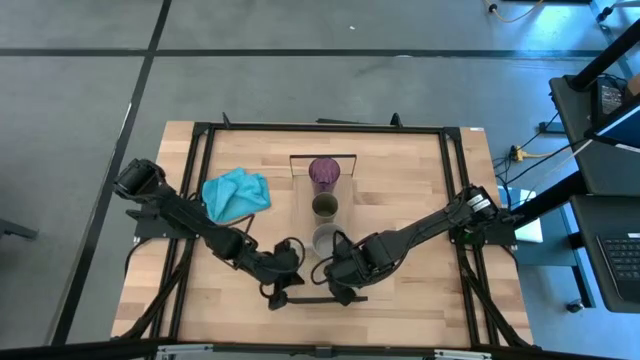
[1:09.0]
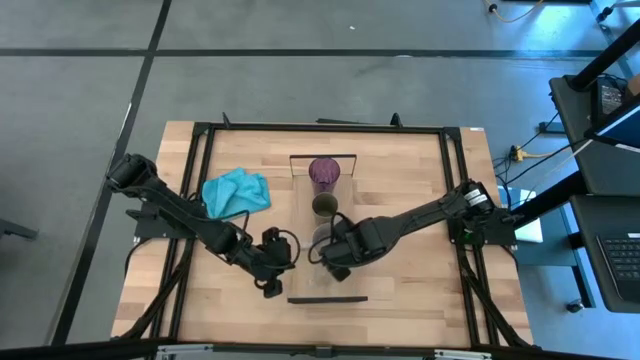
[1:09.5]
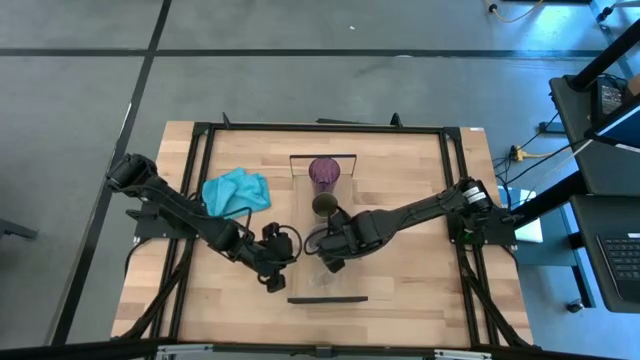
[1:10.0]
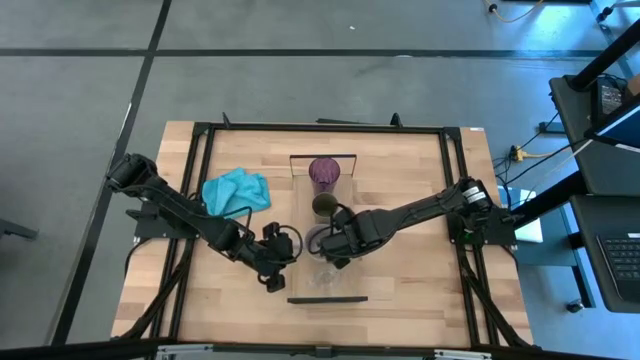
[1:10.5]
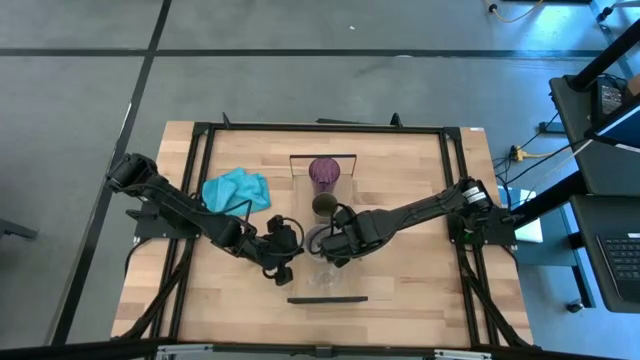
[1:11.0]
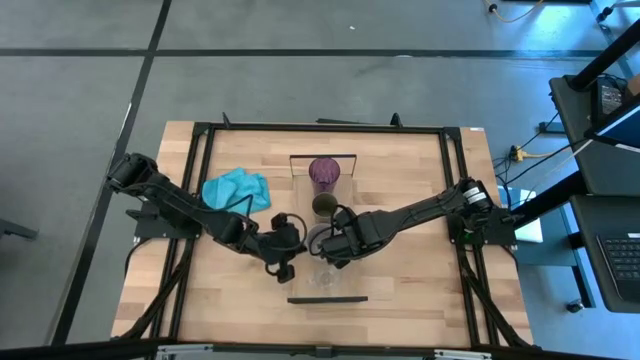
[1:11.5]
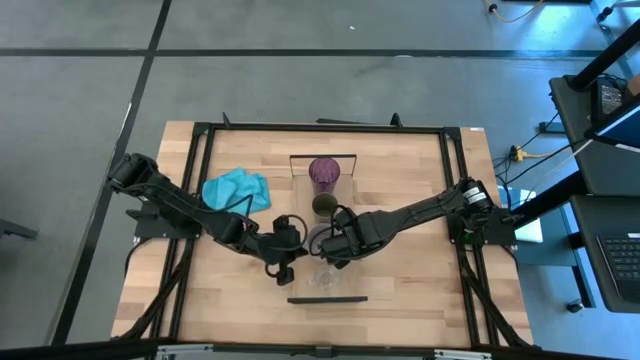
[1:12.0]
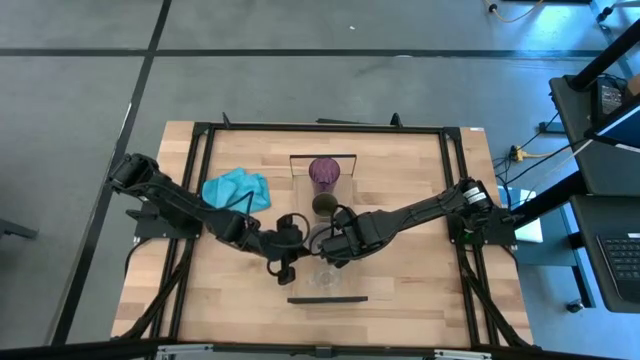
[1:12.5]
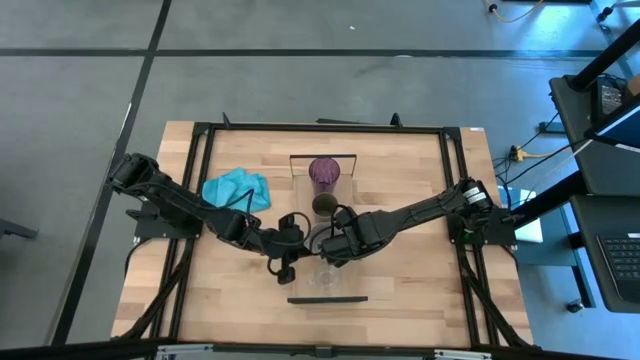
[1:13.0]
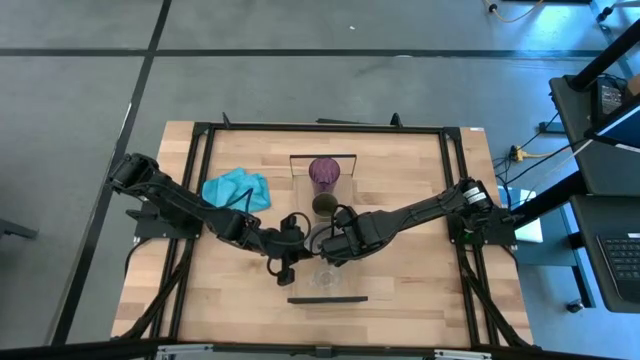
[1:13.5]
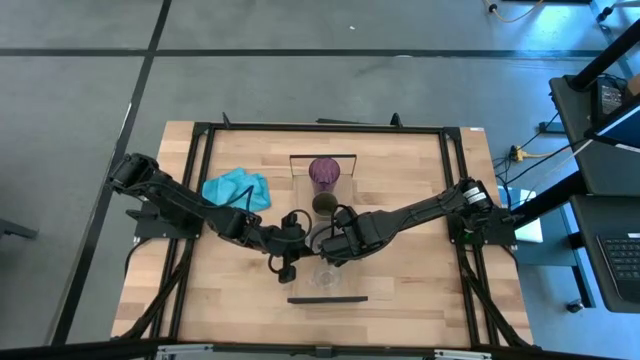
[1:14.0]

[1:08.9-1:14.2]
Task: Stack small to large cups/mugs on shelf
Adjust the light gray mug on the shelf

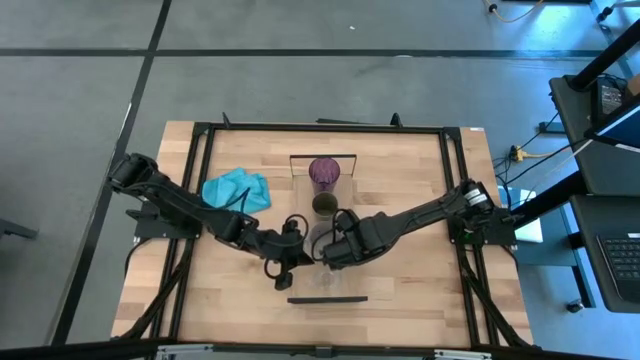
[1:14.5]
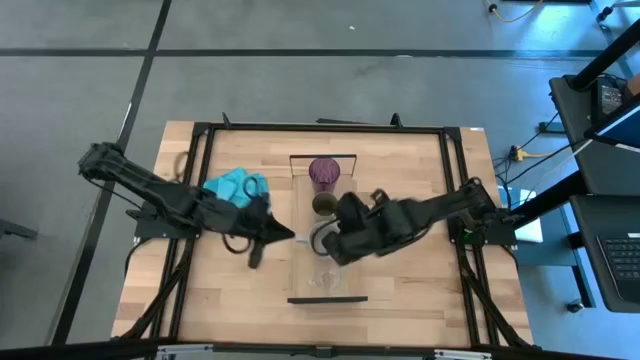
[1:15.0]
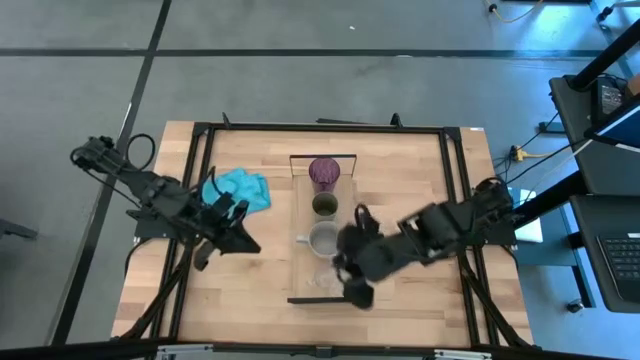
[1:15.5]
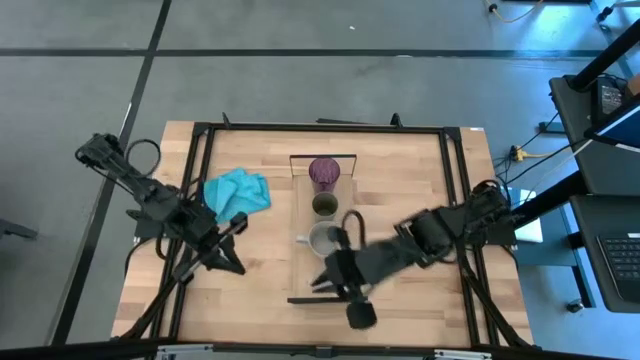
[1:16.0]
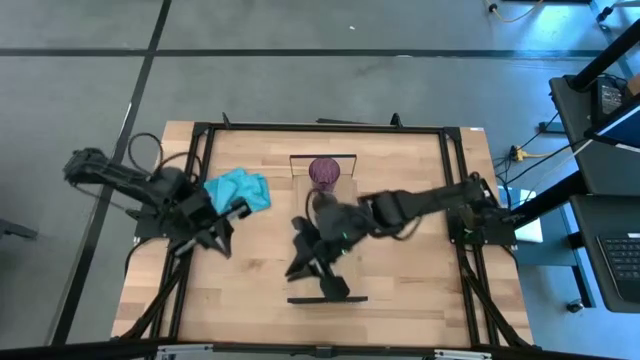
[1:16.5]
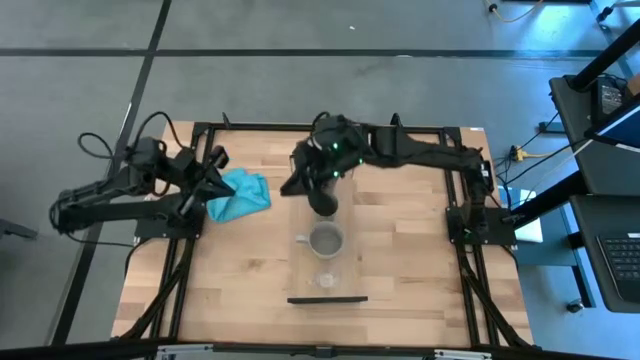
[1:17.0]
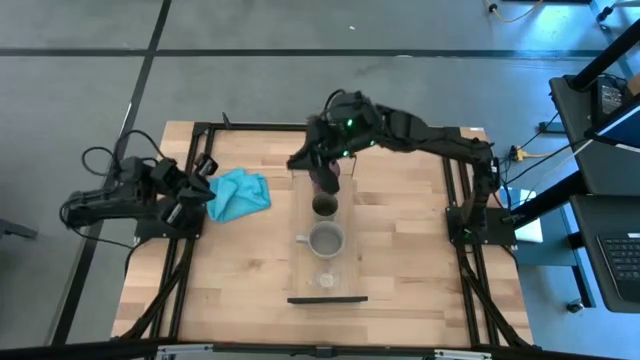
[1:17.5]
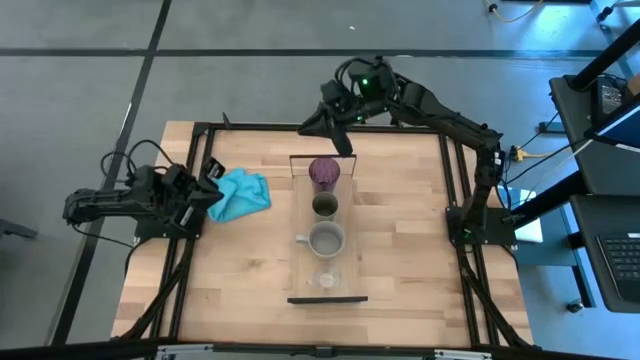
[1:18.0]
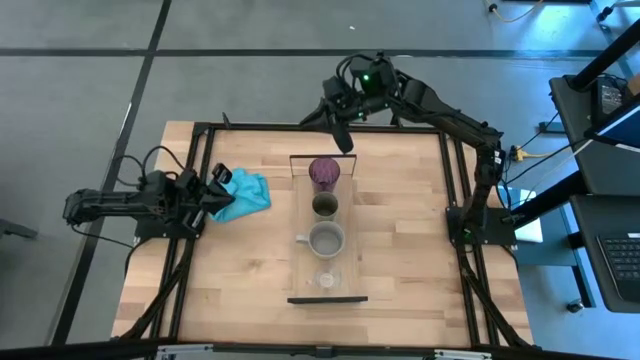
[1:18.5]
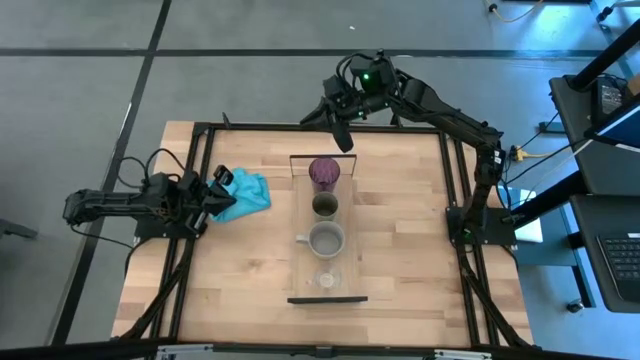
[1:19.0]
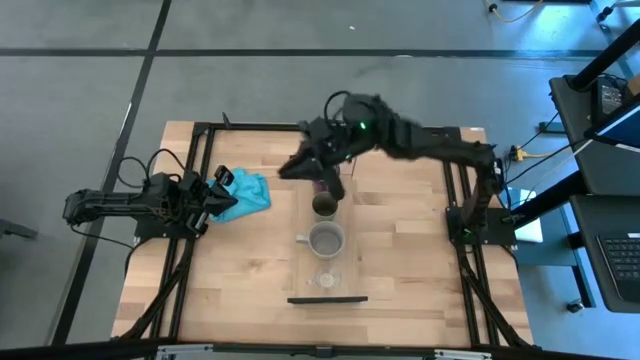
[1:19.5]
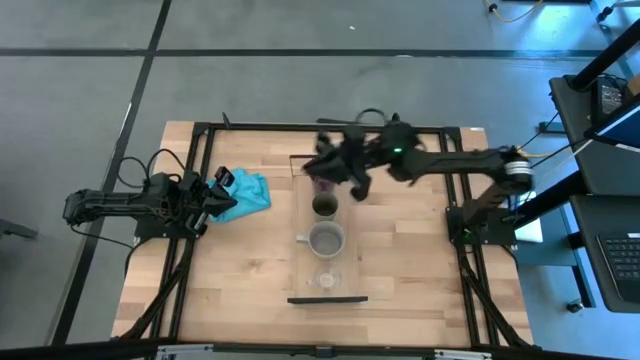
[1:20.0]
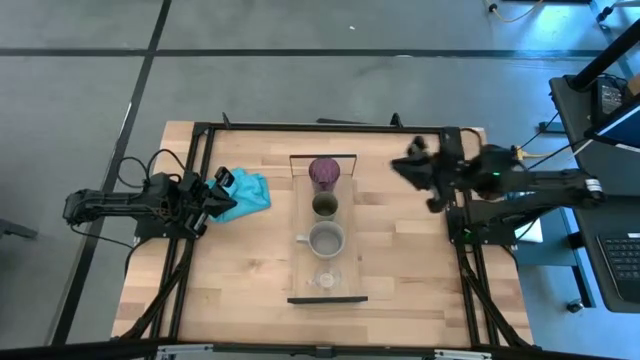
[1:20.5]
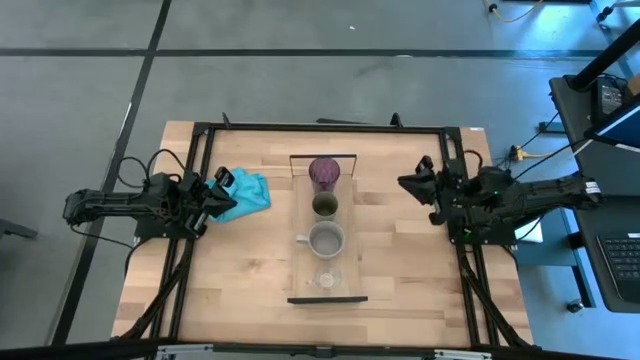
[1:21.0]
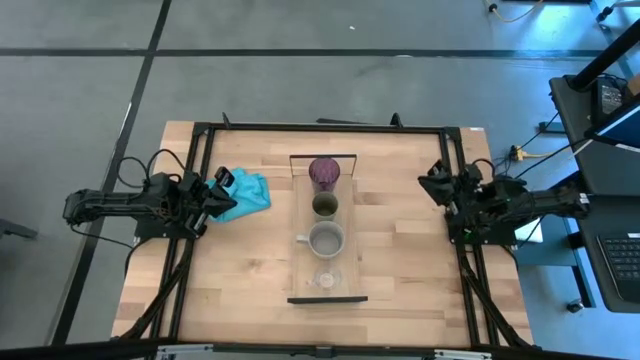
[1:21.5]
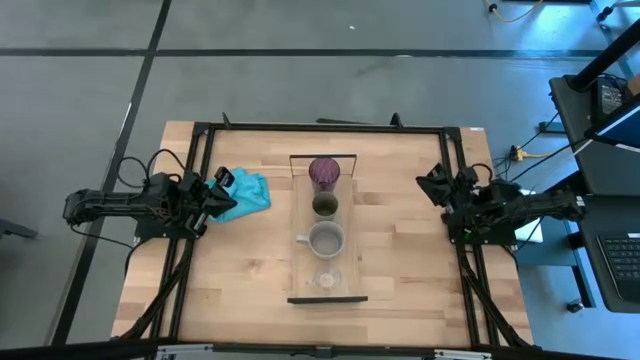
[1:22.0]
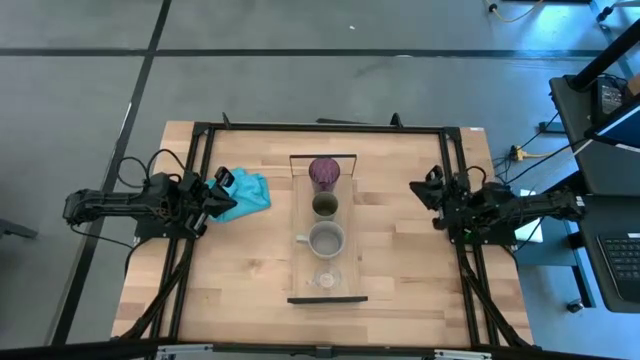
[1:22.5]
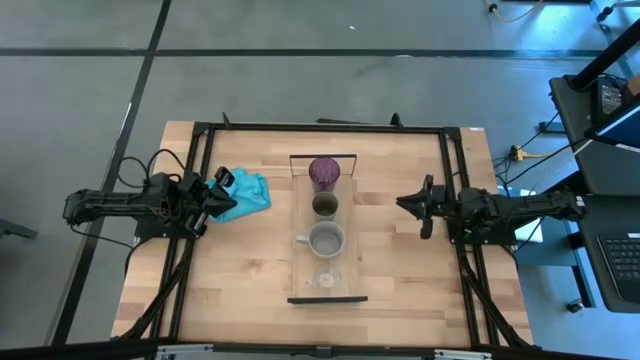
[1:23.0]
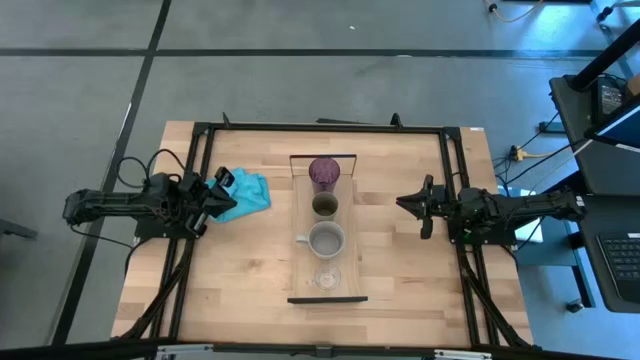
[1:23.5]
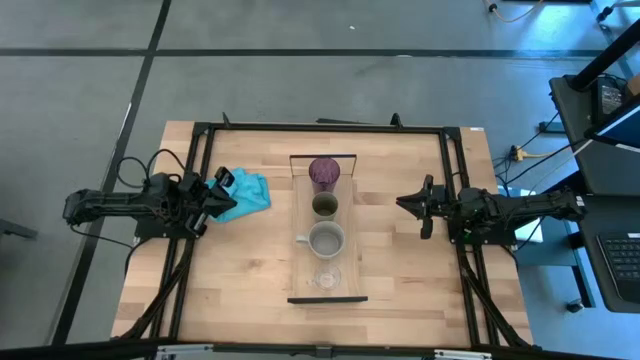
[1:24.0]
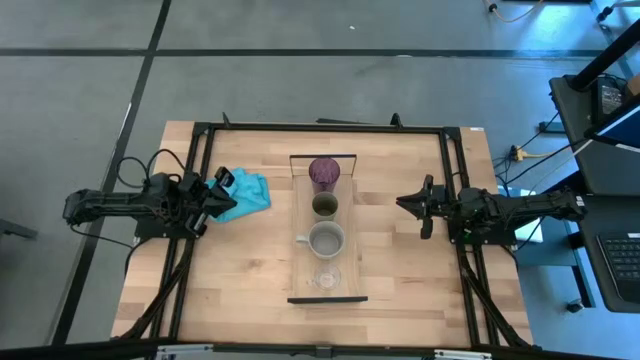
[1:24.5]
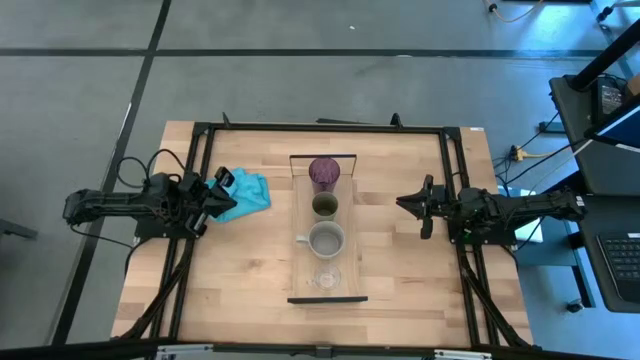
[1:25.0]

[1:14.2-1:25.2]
Return to Home Position

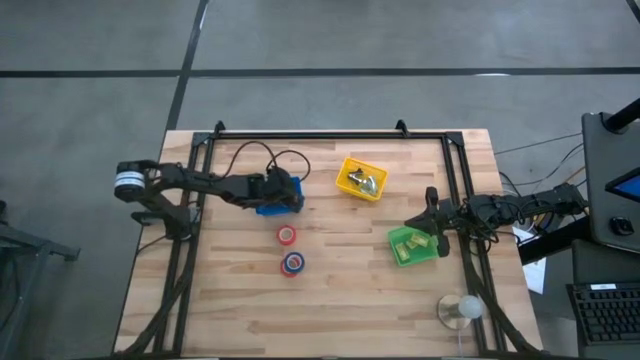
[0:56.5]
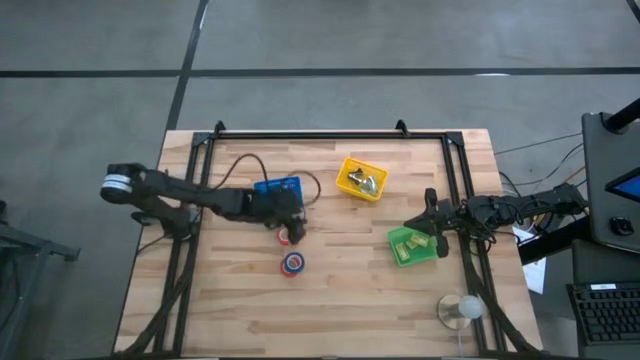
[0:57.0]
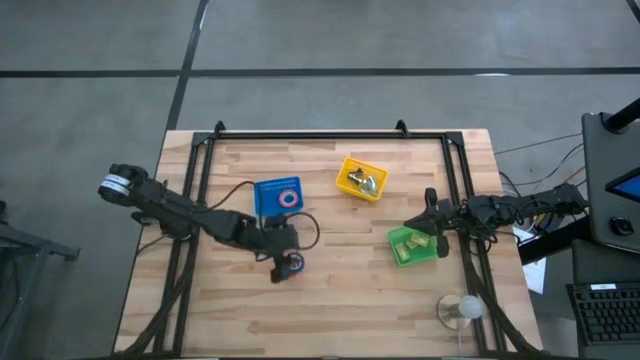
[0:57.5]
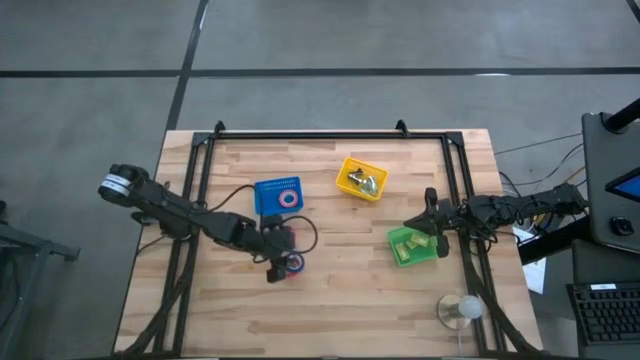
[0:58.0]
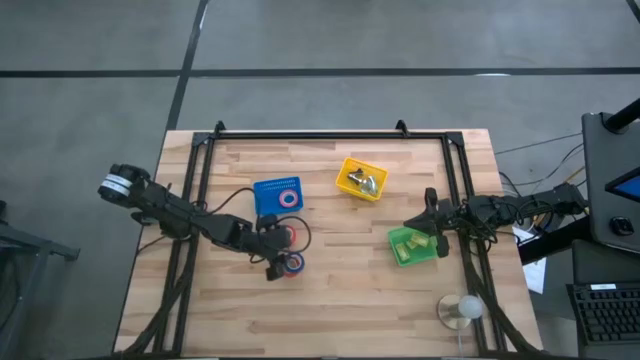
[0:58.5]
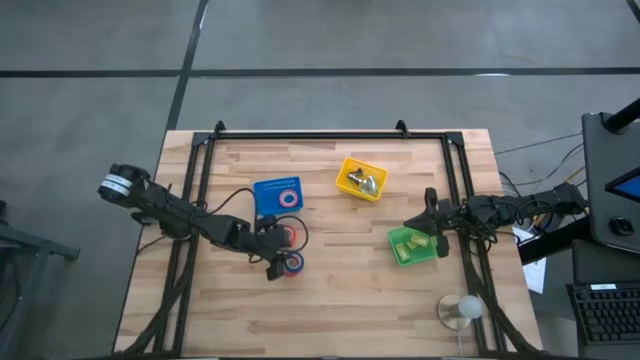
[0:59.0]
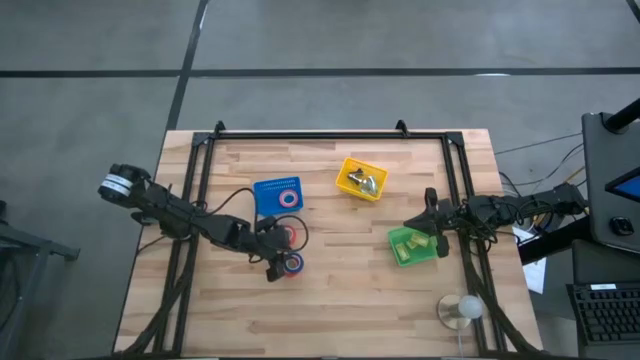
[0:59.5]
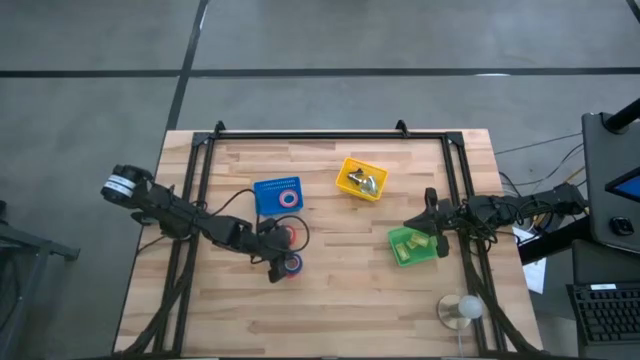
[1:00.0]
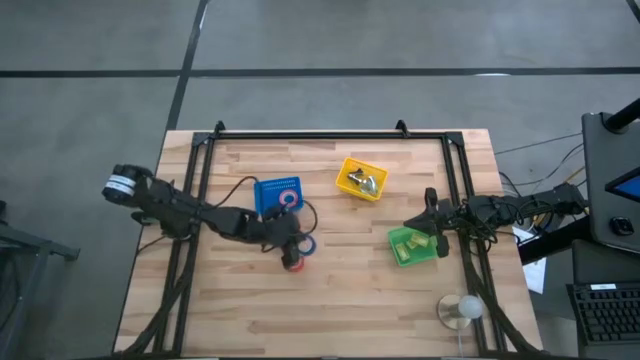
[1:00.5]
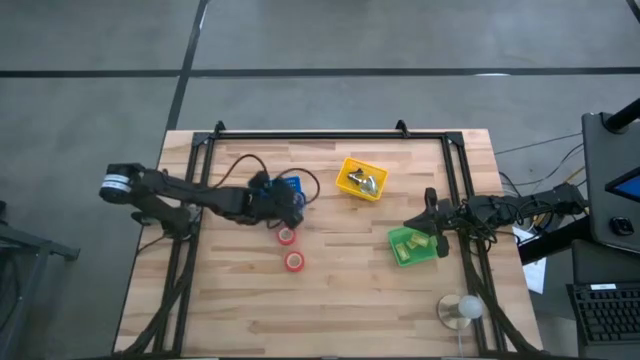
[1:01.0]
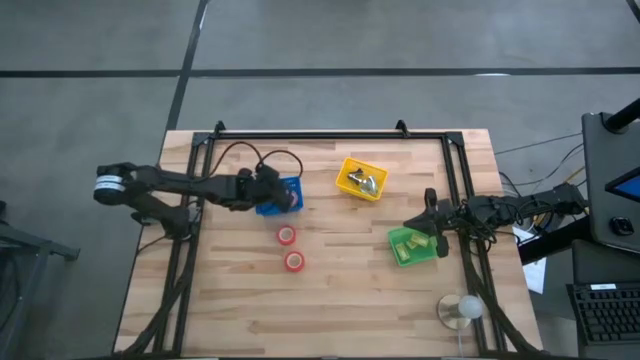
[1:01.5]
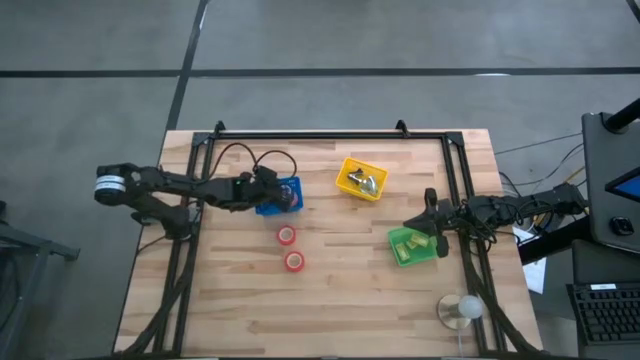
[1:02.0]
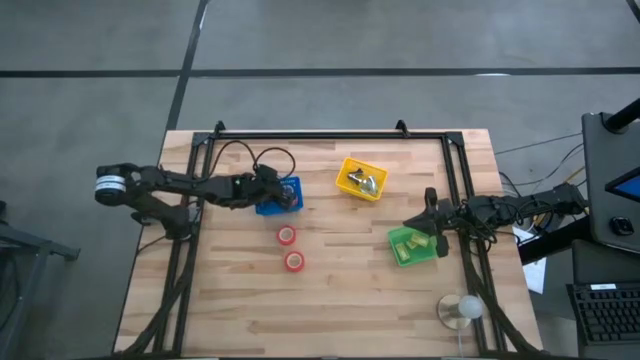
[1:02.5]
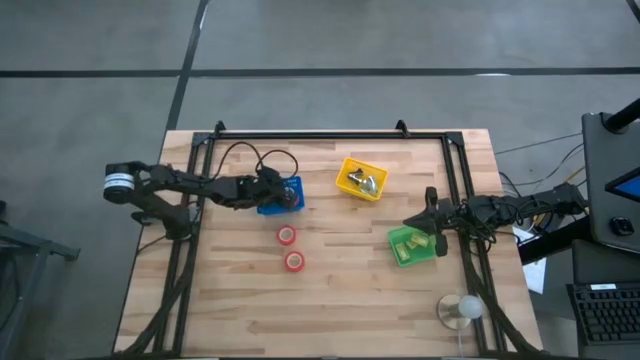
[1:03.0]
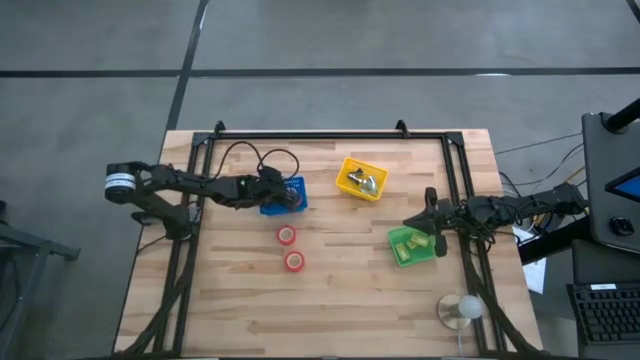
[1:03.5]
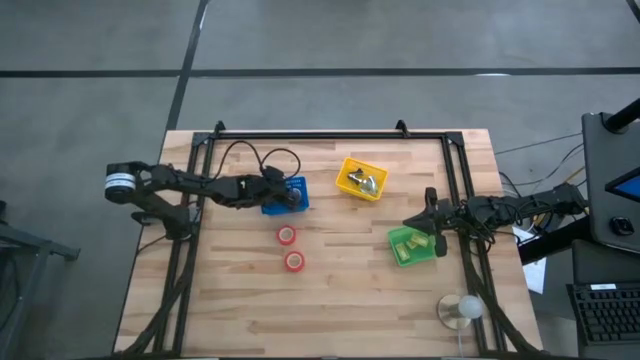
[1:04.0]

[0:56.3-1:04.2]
Task: Pick and place Stapler, Stapler remover, tape
Put the blue tape into the blue bin
